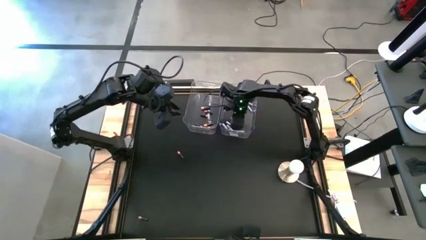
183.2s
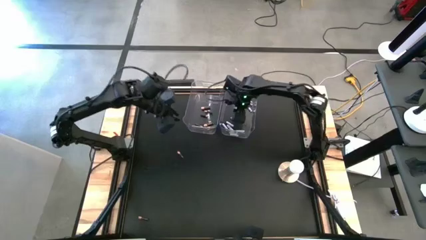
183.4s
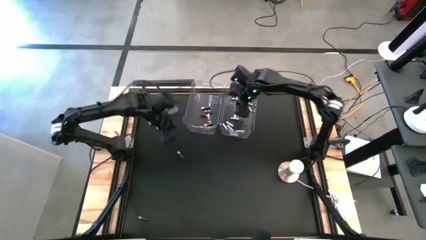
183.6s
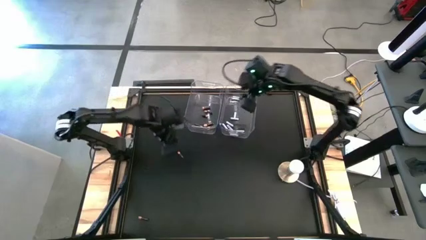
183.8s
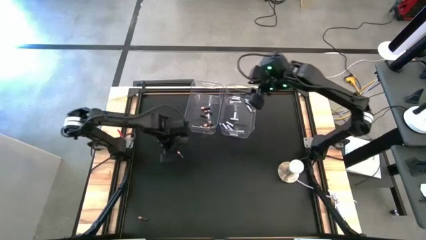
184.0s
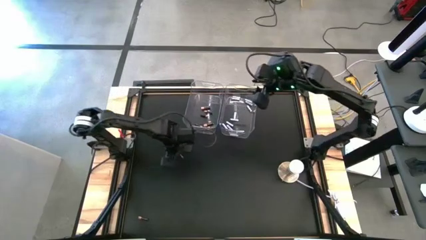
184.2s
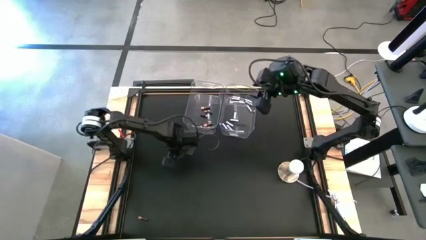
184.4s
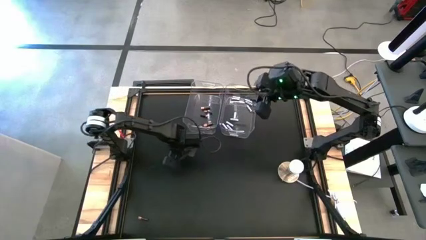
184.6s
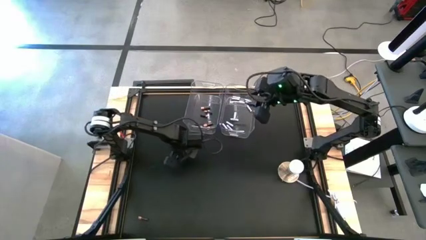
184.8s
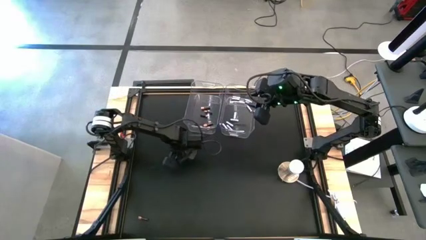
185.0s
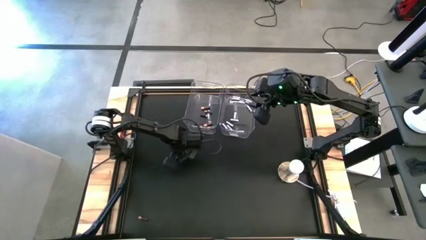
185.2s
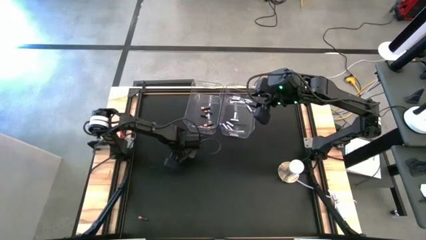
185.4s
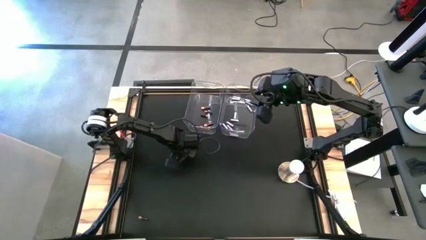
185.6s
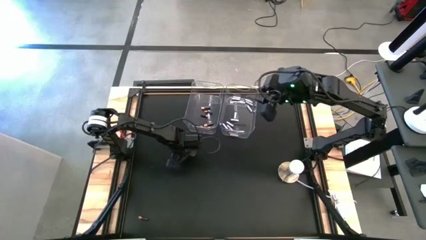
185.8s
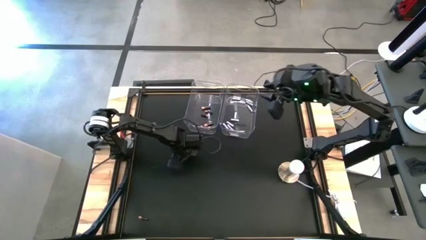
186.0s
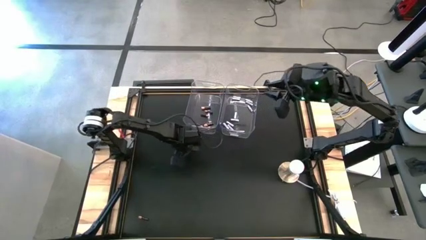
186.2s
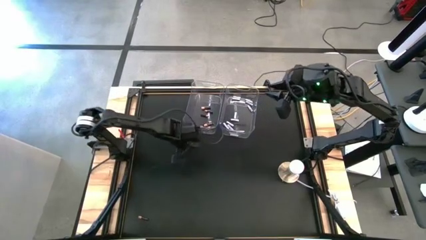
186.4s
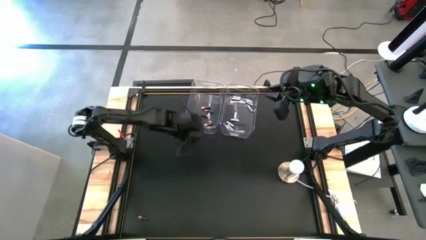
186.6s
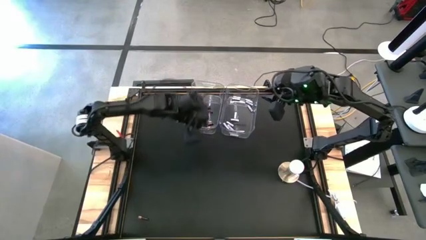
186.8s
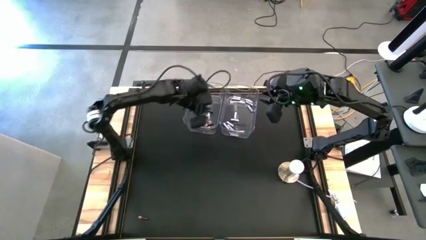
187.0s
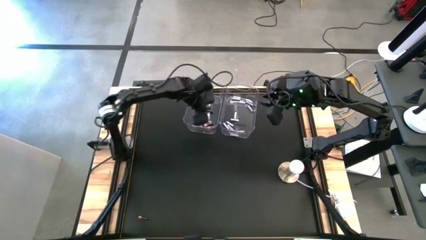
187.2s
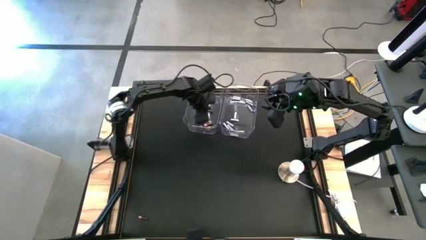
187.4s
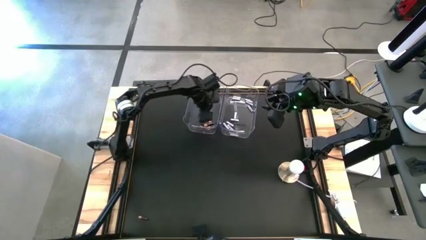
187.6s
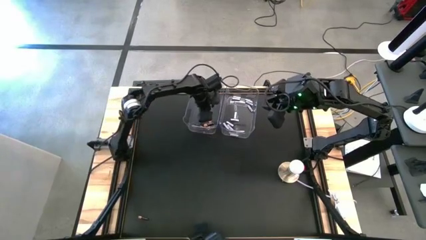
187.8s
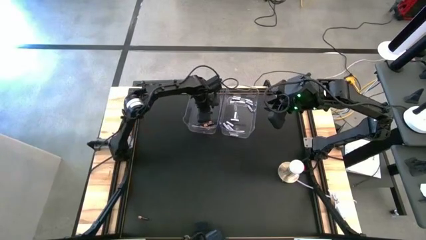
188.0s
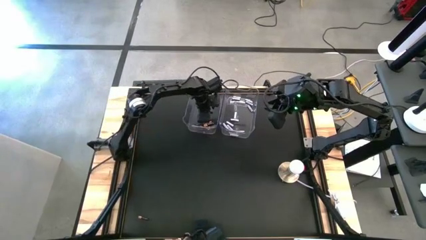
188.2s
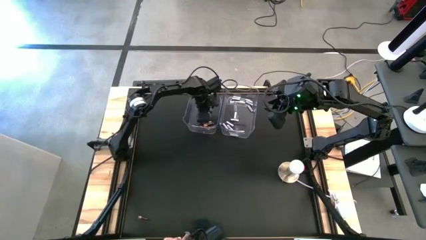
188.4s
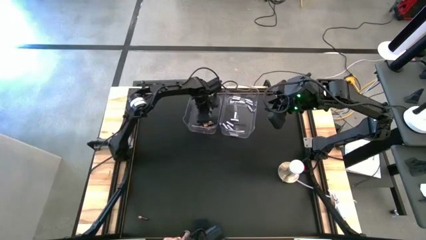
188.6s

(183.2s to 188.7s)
Task: Sort batteries
Put the black battery into the left transparent bin

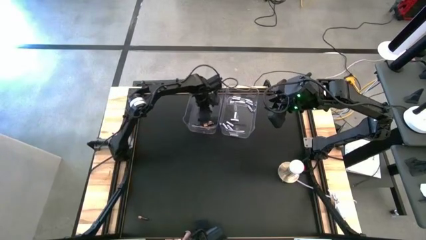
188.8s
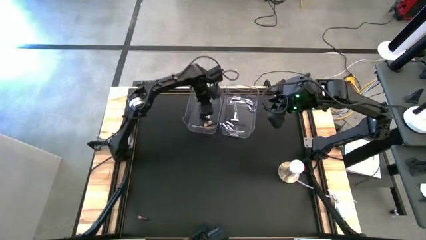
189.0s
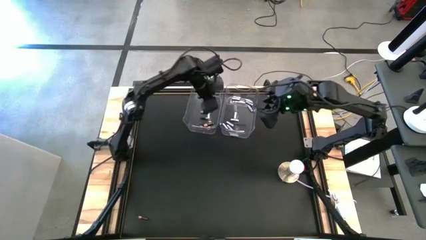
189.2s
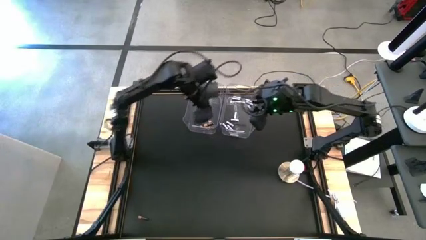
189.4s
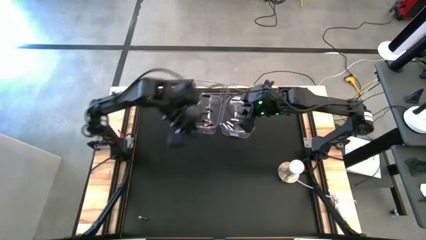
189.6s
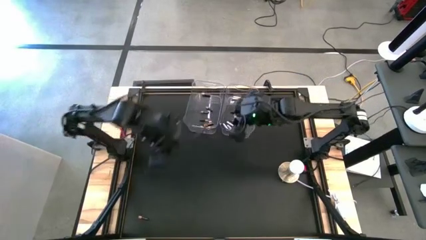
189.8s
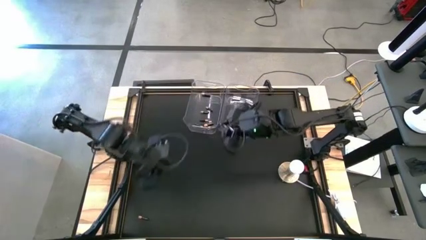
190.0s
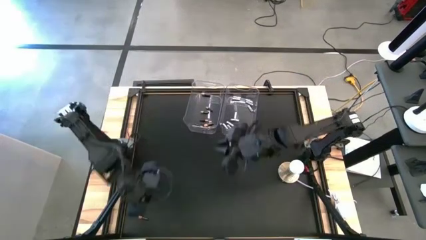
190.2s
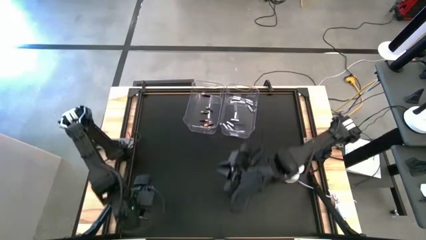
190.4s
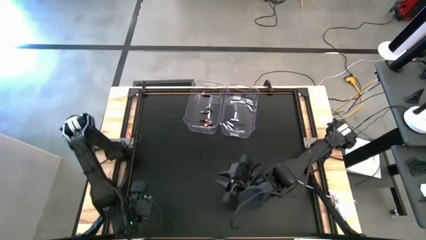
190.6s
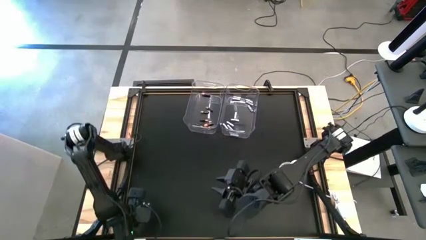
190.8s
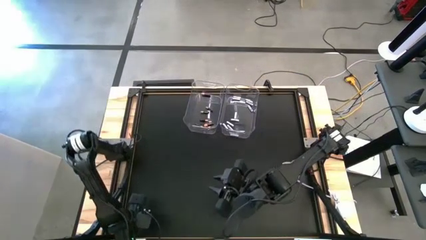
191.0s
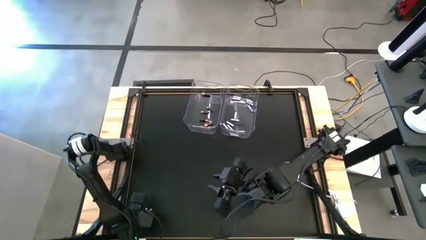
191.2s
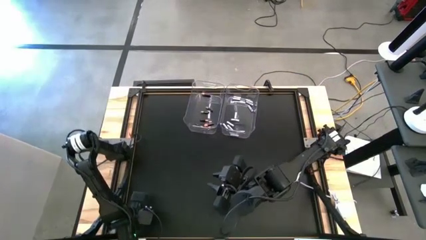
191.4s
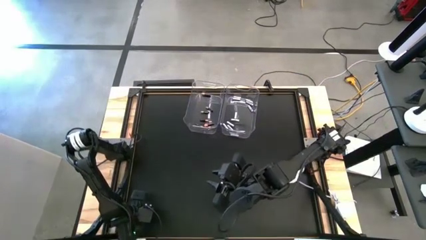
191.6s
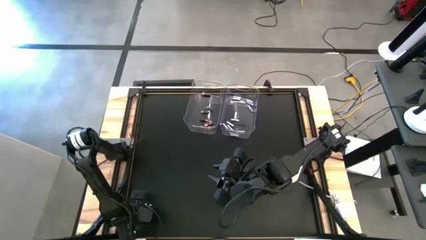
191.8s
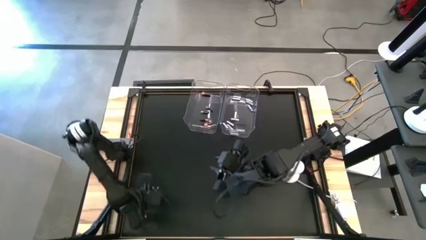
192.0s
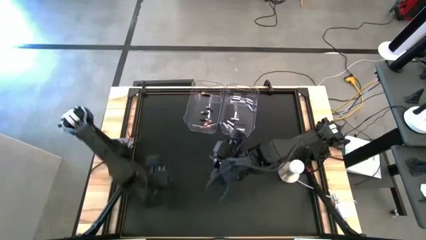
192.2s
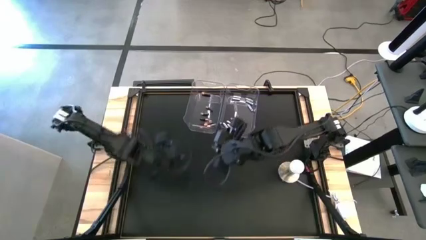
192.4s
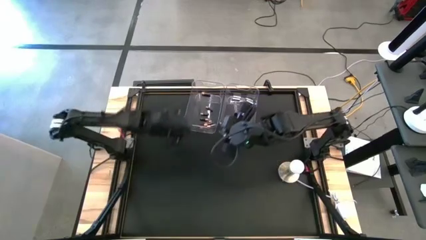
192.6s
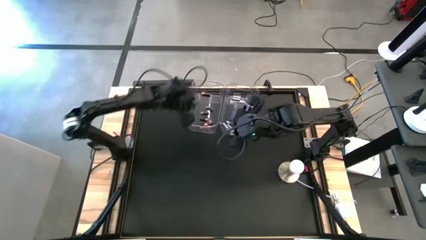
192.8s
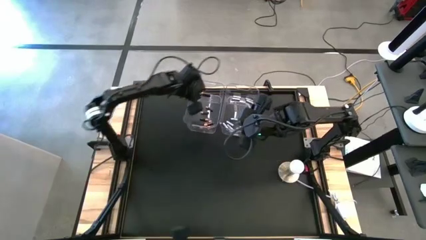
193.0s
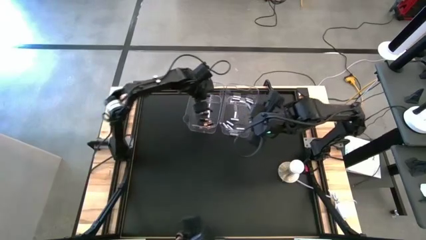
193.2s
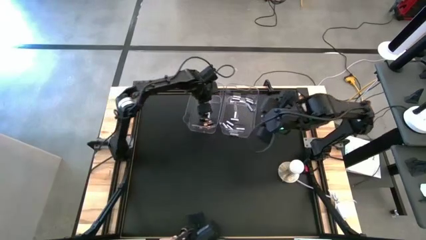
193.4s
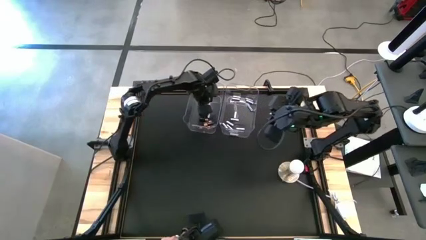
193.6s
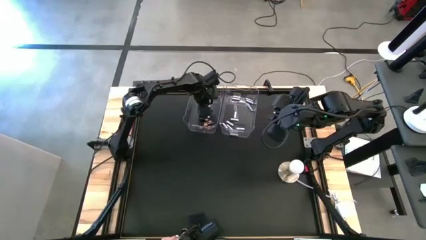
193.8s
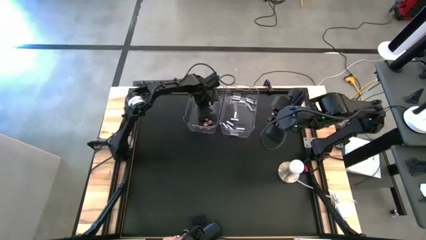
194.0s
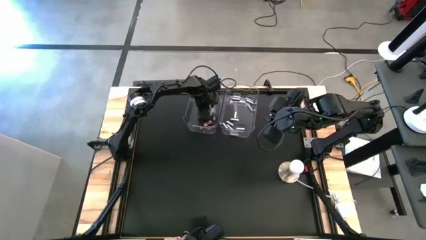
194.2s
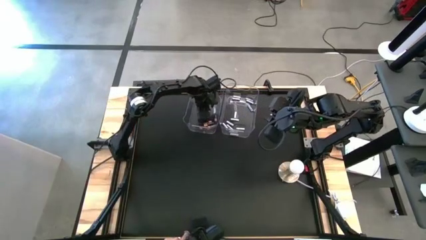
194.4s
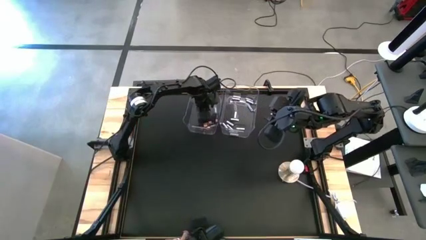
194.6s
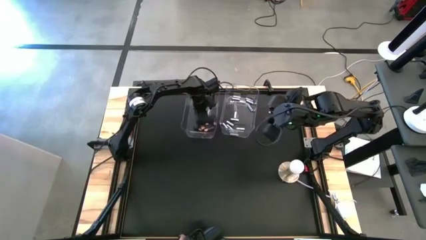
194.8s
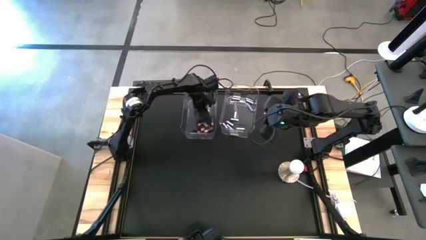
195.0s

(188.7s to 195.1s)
Put the black battery into the left transparent bin

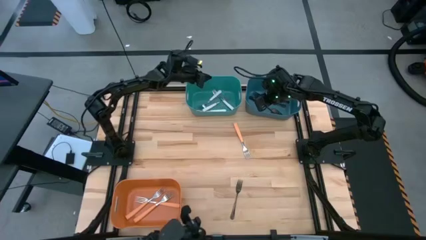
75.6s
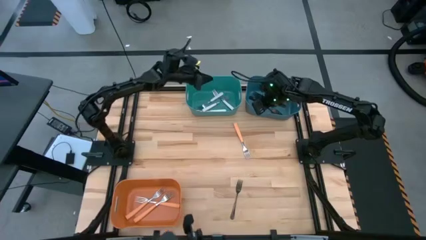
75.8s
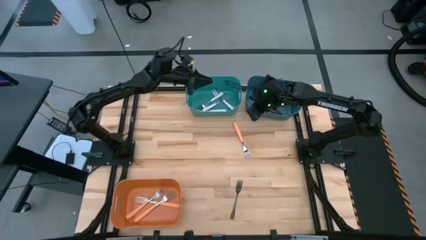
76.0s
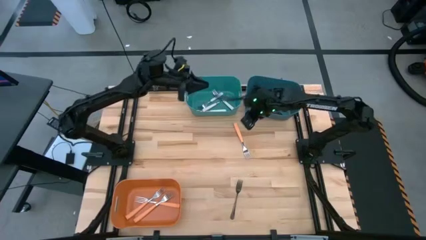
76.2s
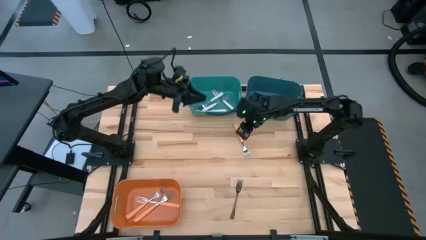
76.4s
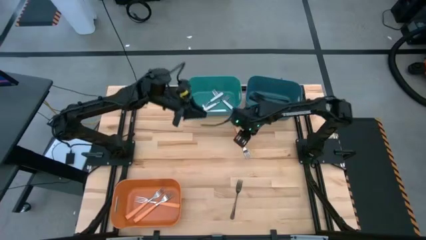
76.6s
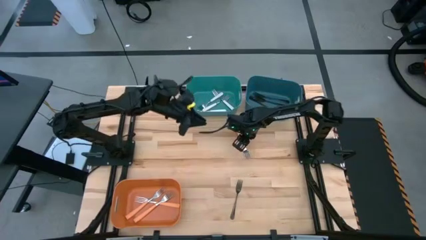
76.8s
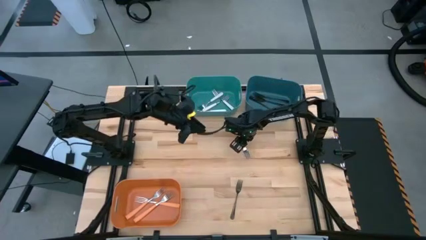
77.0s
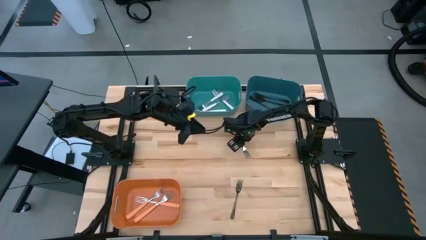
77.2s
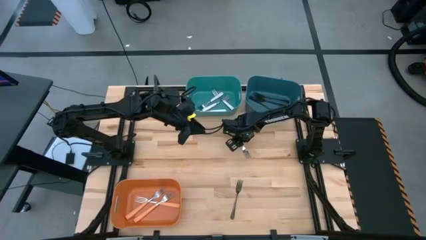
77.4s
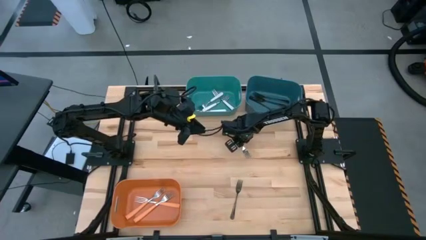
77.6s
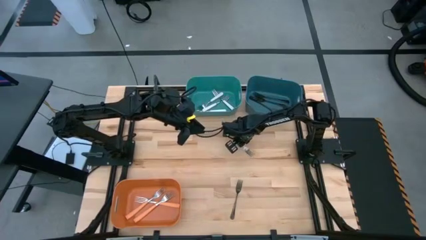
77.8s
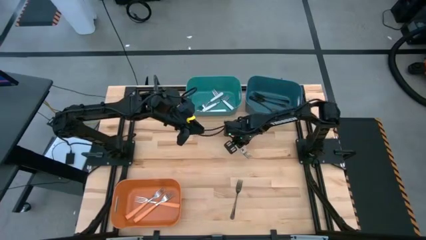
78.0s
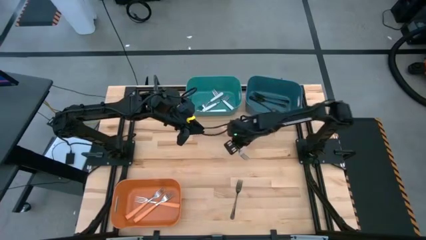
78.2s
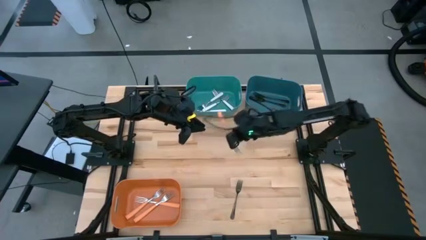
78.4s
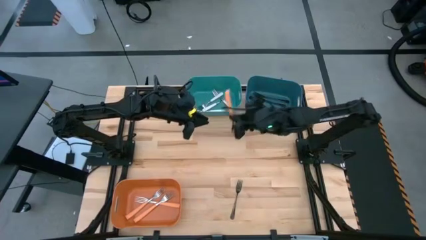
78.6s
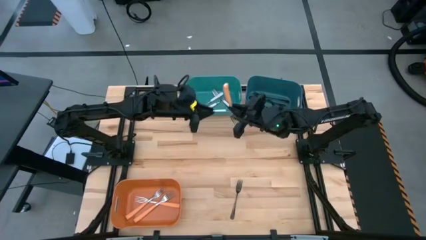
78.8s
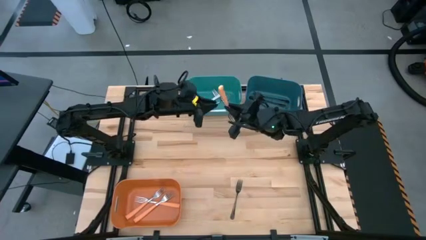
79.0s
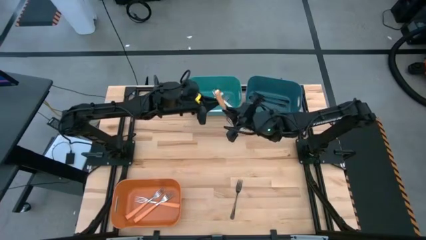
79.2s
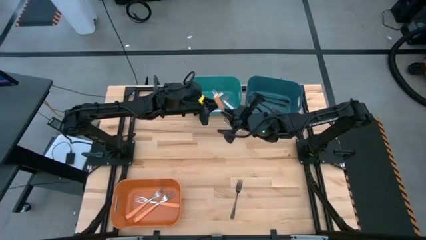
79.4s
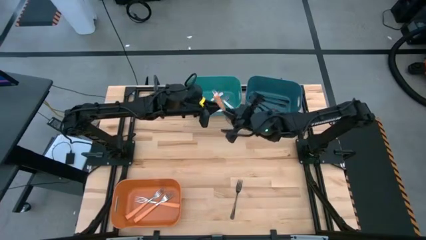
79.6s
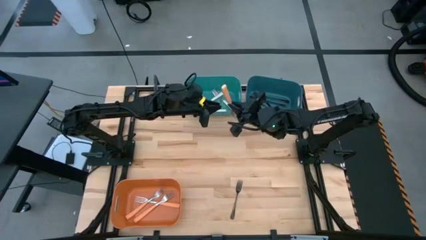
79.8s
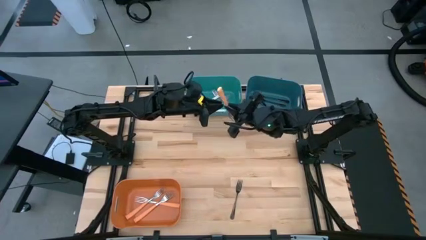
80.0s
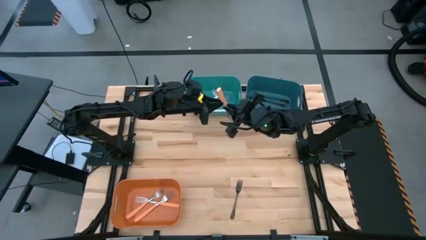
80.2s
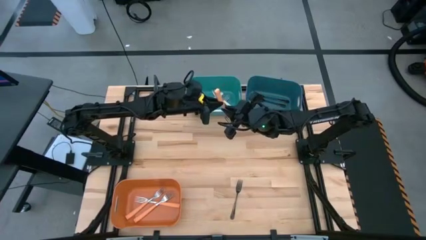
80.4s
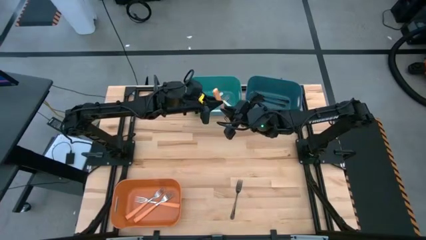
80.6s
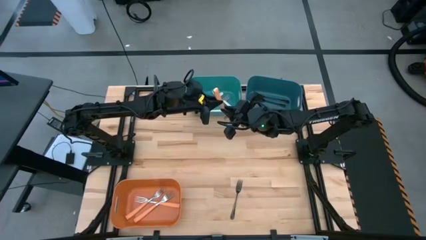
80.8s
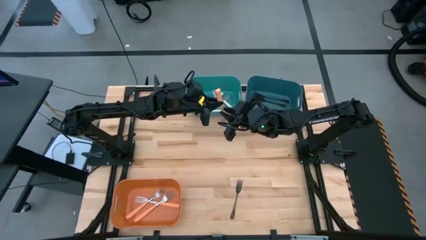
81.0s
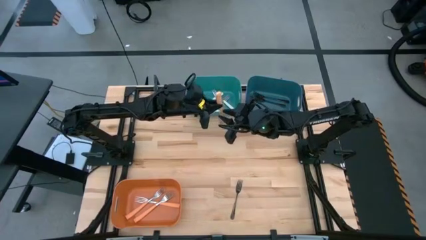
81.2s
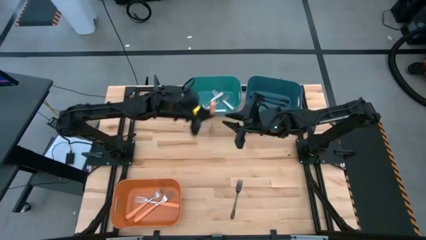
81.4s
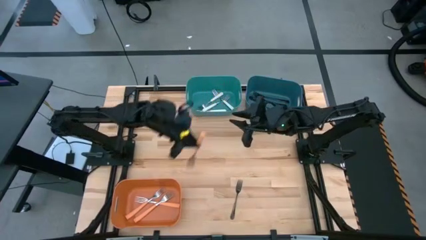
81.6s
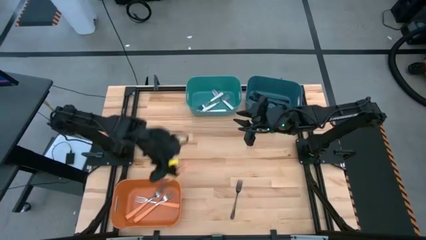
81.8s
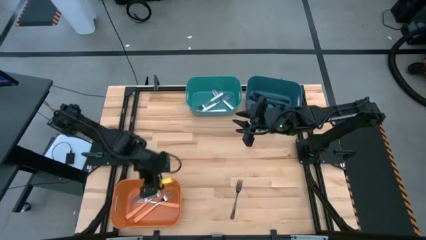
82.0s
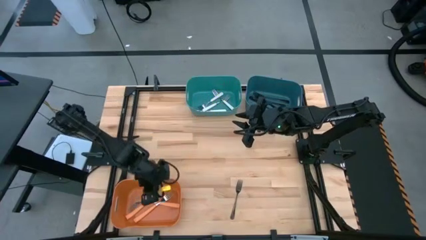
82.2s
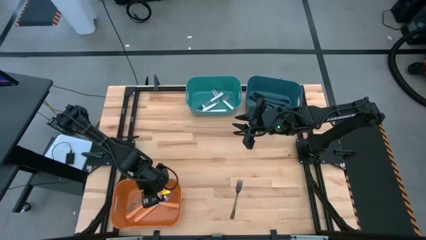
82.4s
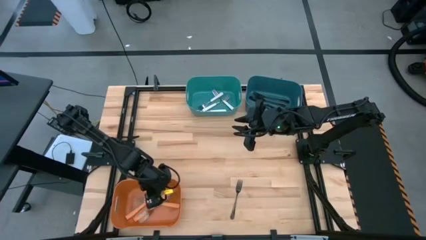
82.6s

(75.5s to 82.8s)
Task: Sort silverware by color (type)
Put the orange fork into the orange bin
